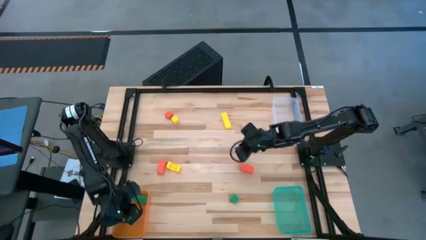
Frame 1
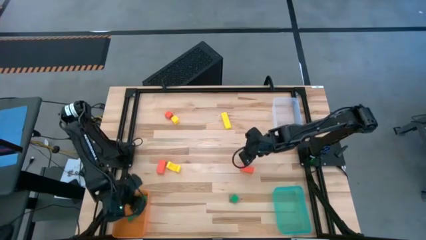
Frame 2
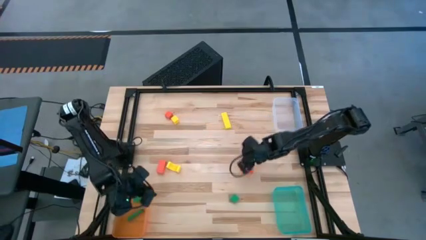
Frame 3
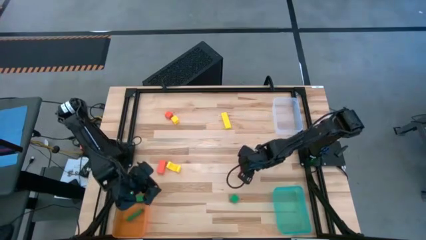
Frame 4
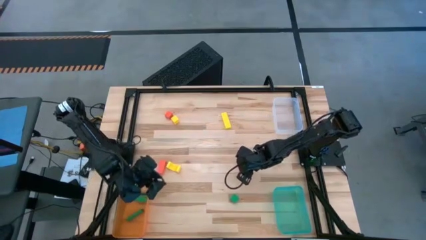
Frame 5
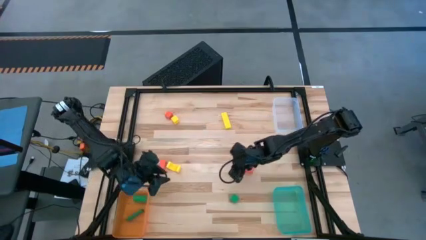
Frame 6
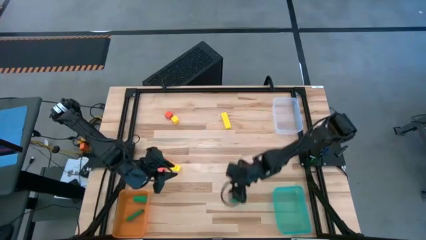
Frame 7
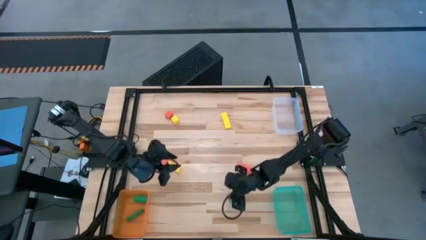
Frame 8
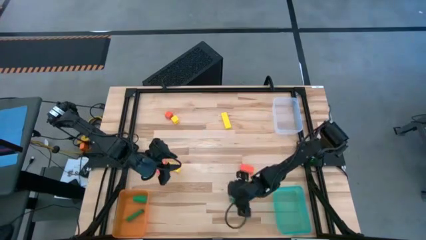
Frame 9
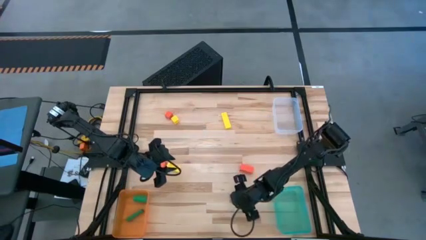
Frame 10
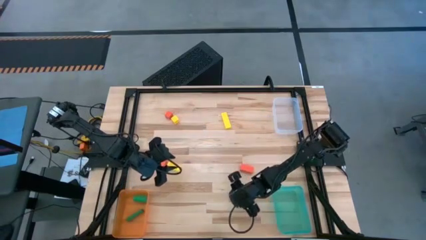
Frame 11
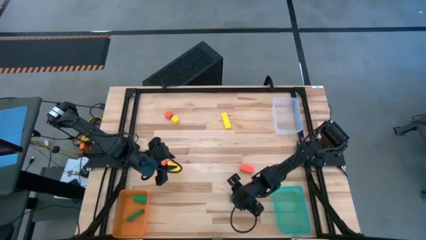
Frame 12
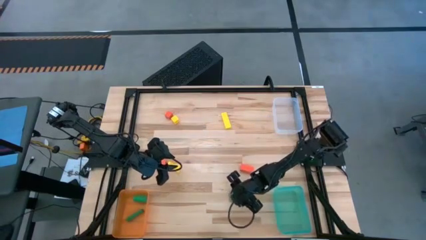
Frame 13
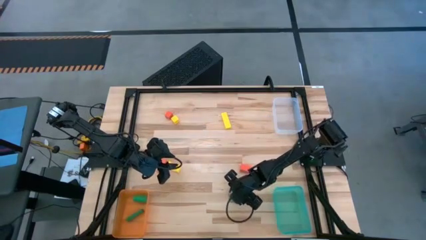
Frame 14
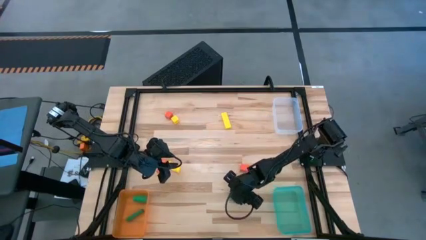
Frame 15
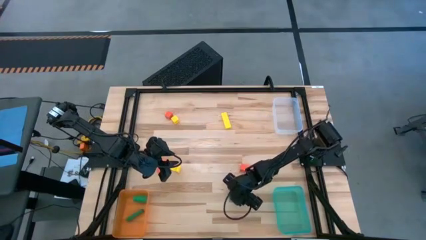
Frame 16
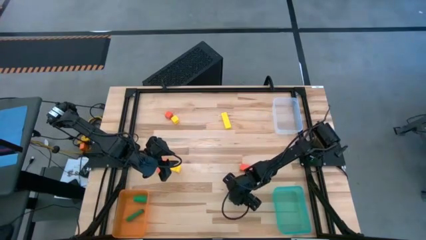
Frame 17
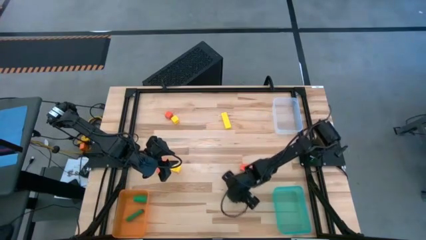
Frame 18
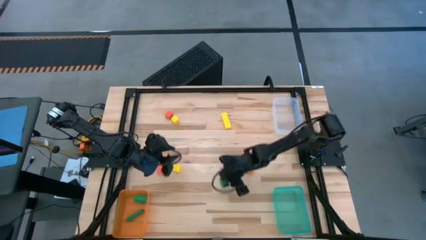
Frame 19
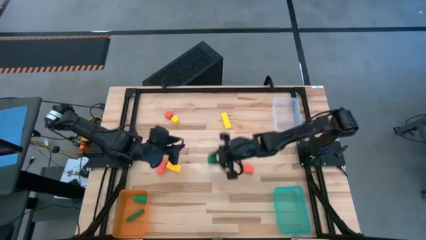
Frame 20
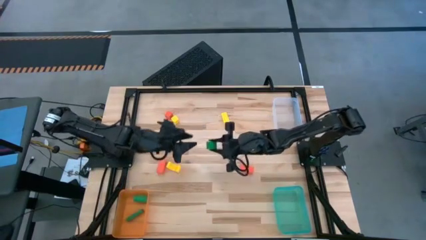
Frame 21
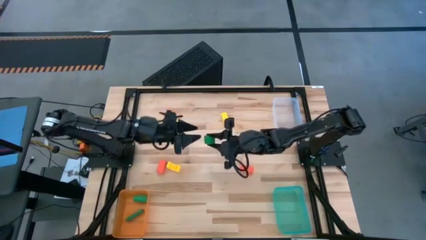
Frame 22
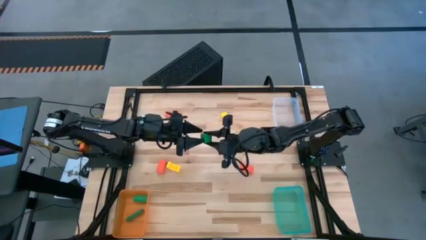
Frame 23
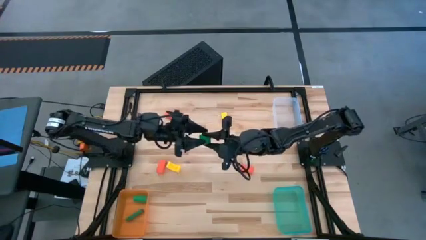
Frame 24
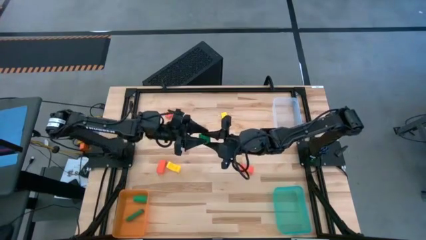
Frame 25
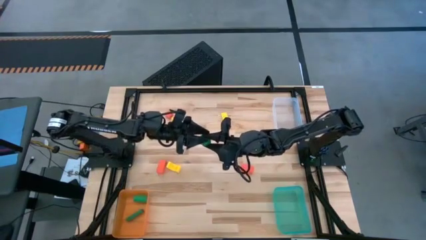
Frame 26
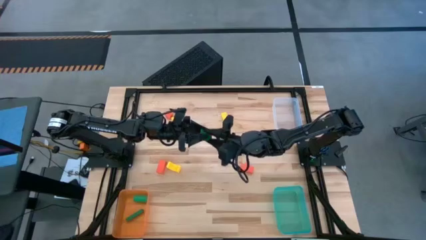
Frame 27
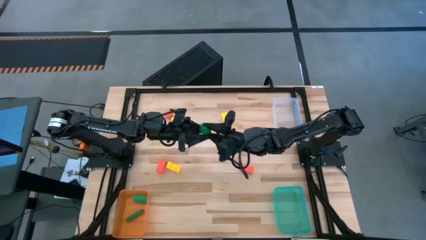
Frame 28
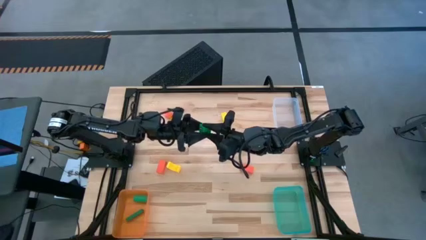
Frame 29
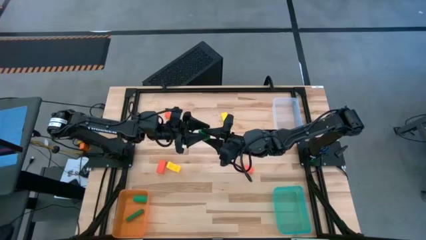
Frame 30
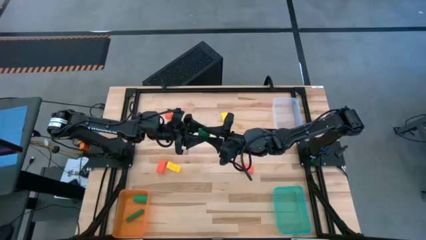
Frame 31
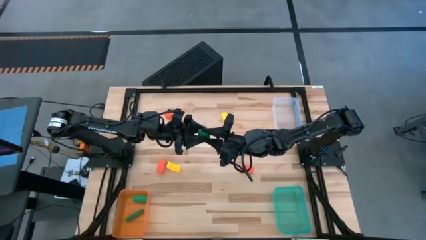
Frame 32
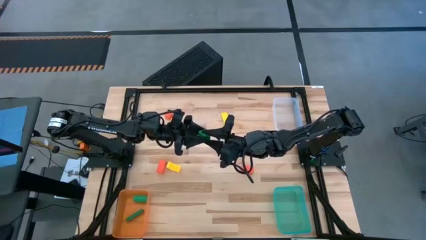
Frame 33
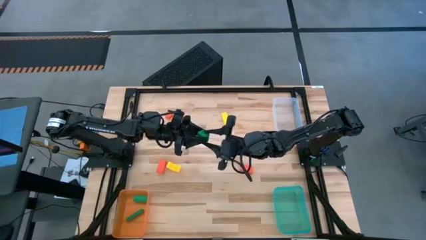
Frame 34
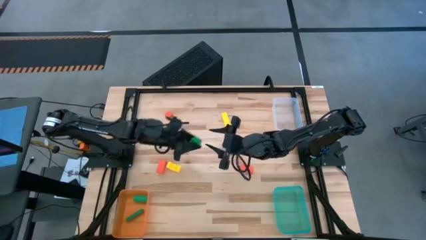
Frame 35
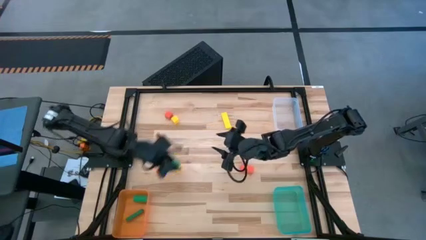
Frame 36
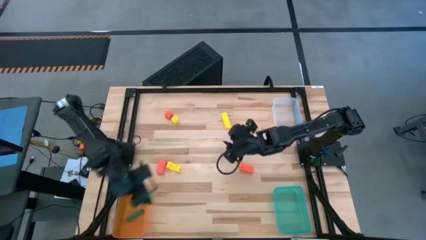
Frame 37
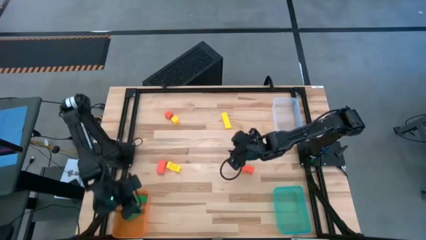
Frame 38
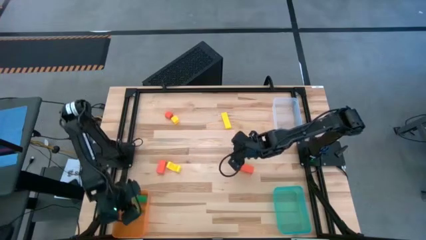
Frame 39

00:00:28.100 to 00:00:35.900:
Task: Sort & place blocks by color
Put the green block into the orange bin

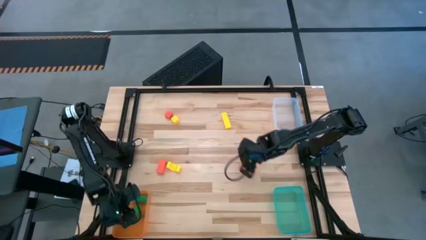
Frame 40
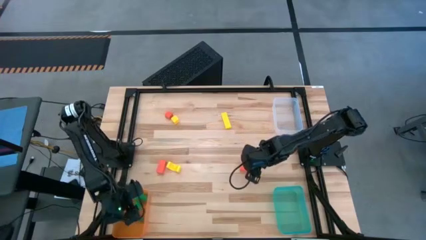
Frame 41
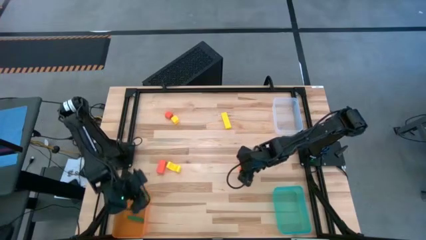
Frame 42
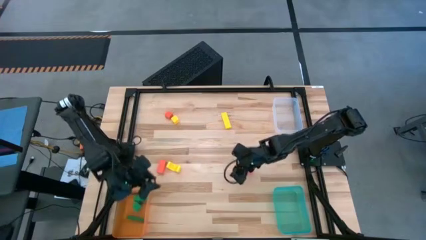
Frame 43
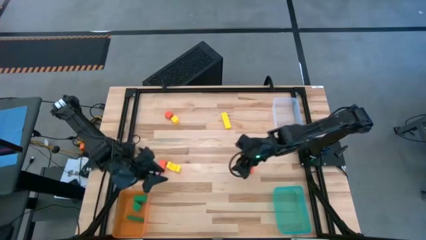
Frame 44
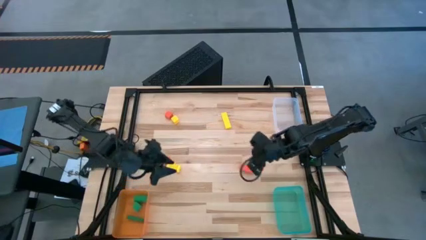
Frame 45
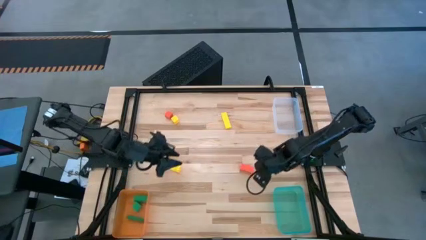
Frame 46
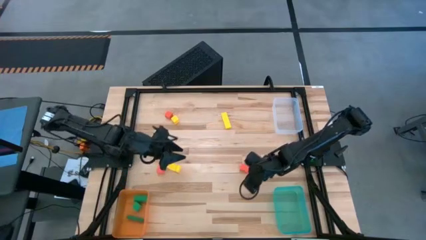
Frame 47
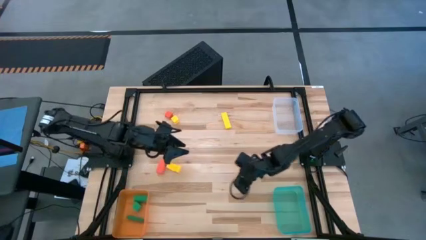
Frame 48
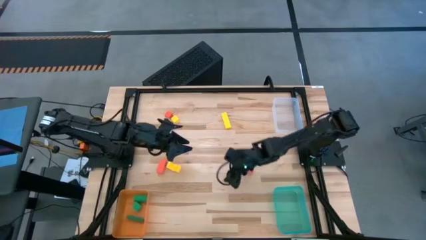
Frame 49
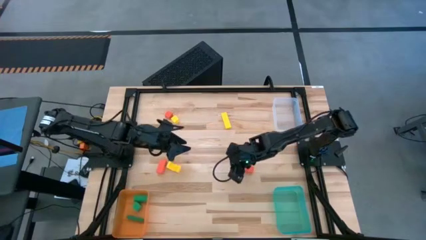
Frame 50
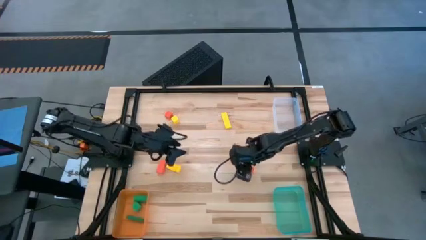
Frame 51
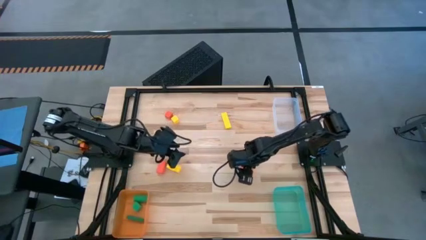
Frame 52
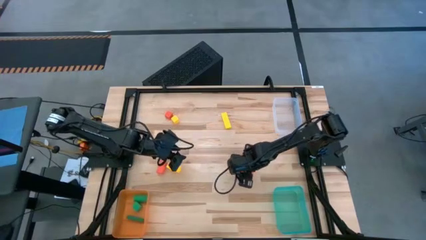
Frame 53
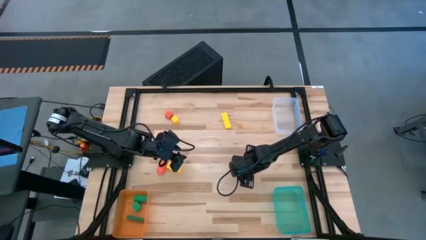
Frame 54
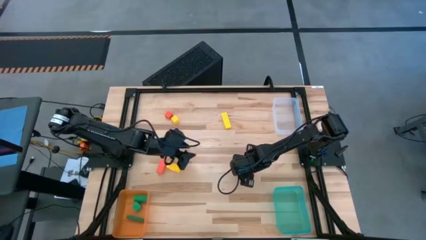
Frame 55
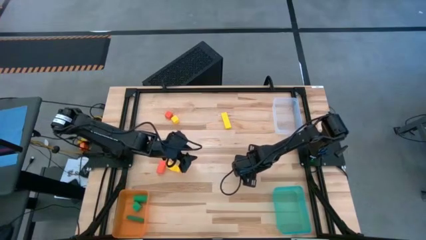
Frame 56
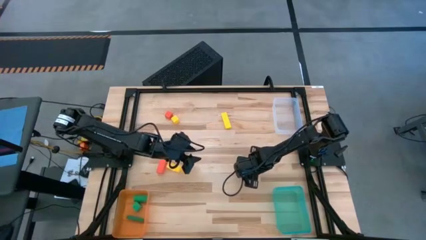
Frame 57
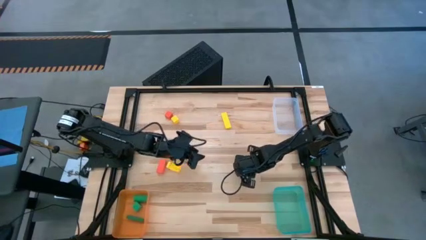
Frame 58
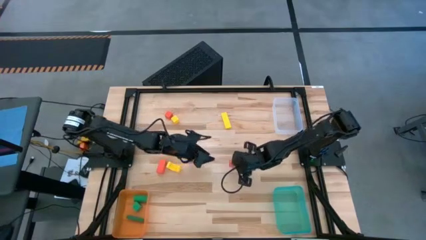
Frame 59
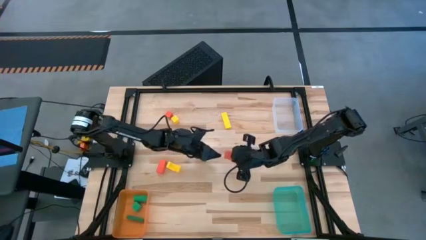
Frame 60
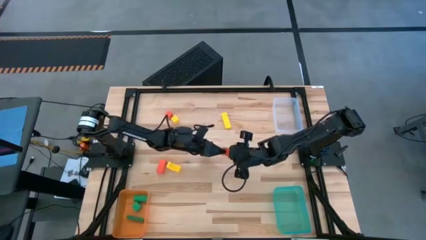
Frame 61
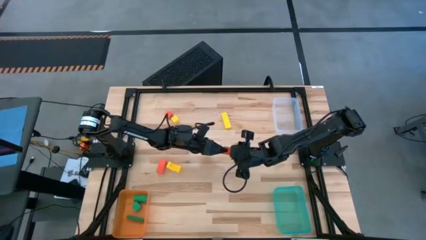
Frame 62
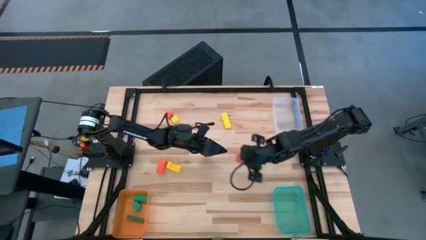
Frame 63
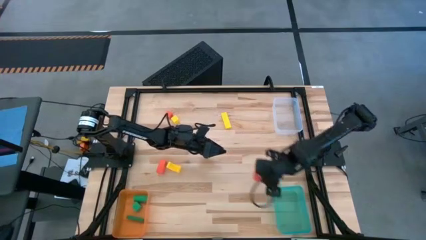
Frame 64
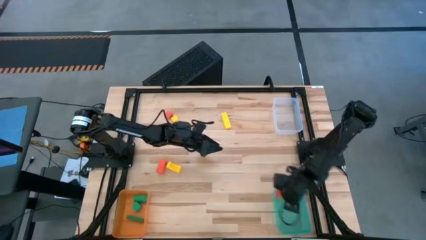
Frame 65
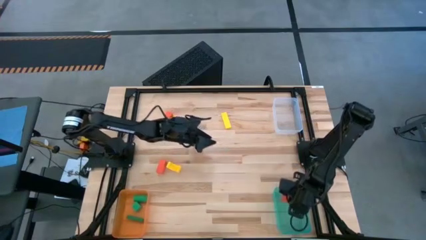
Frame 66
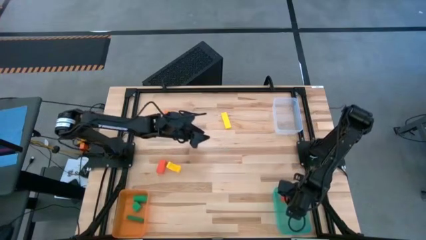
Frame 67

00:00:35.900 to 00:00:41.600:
Put the bottom right orange block into the blue bin

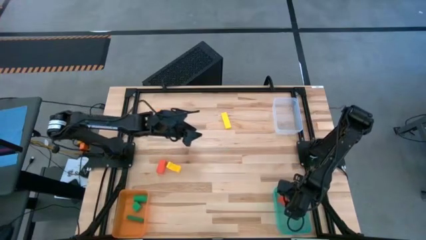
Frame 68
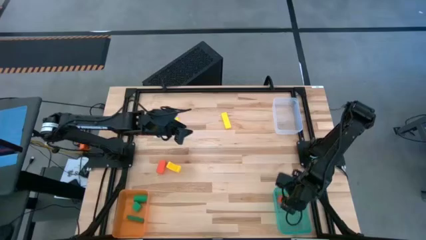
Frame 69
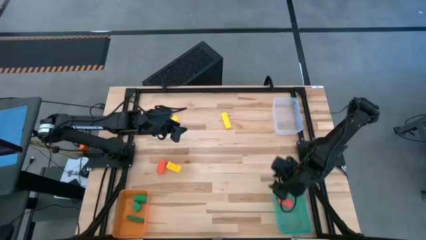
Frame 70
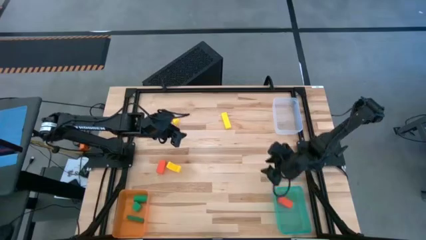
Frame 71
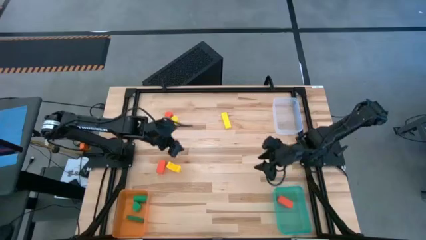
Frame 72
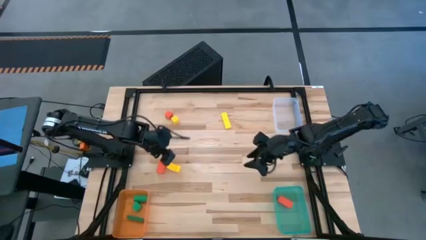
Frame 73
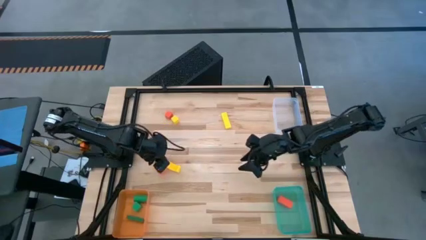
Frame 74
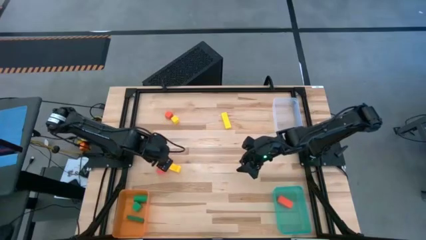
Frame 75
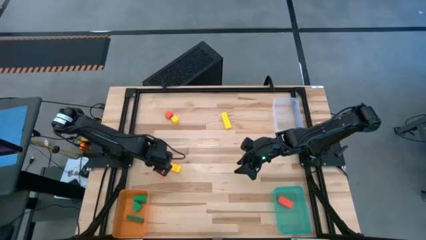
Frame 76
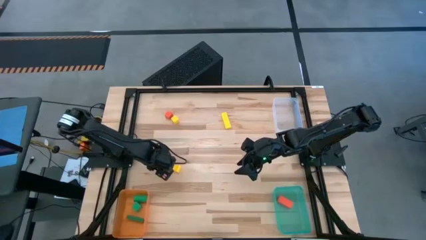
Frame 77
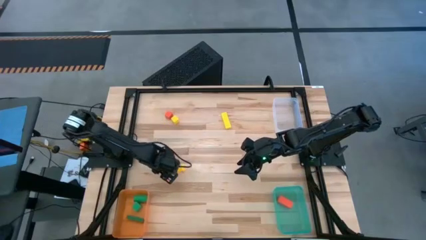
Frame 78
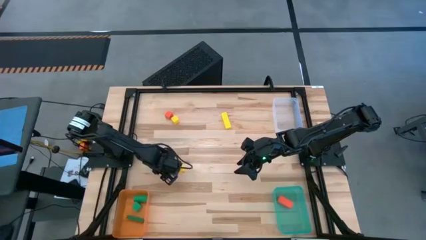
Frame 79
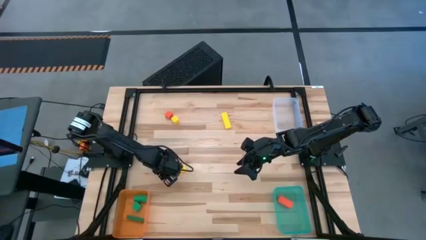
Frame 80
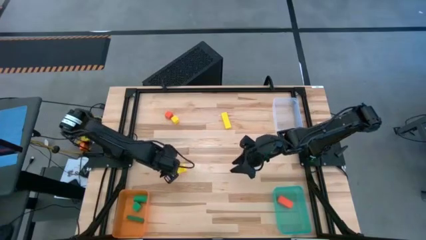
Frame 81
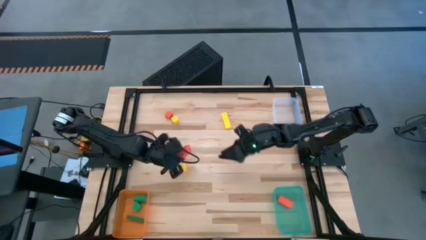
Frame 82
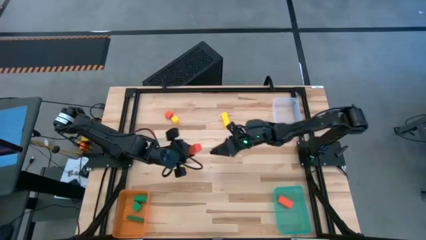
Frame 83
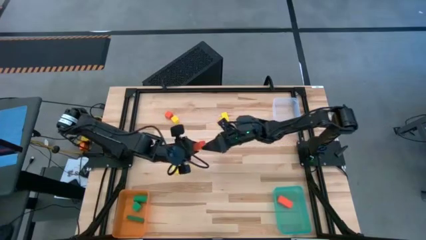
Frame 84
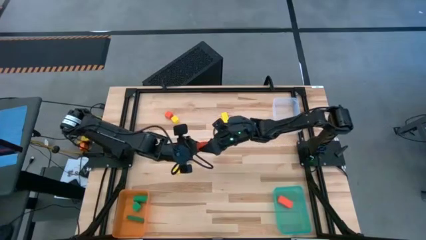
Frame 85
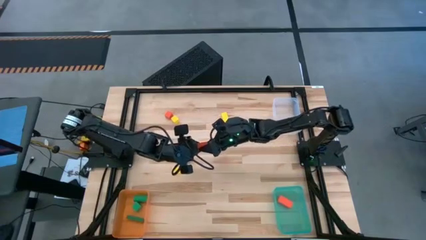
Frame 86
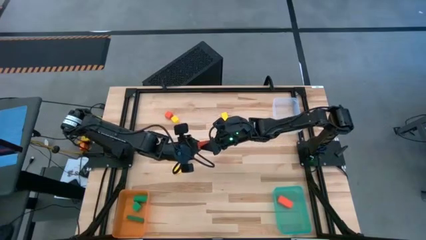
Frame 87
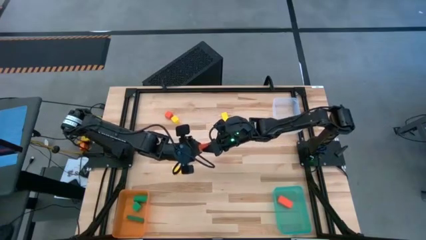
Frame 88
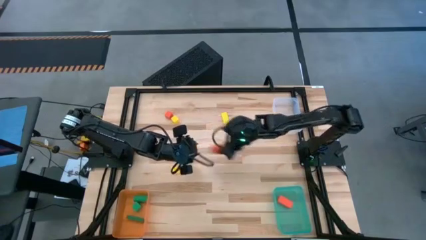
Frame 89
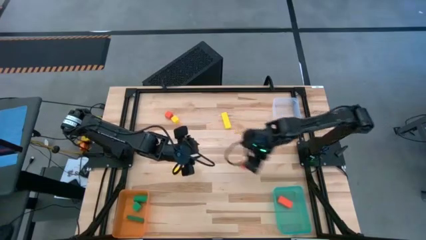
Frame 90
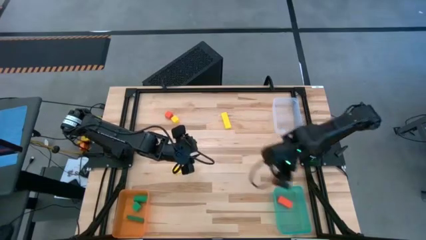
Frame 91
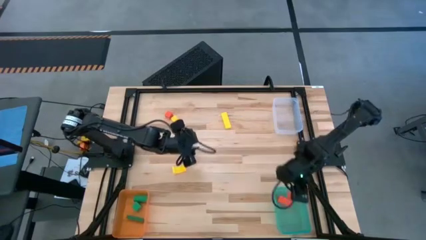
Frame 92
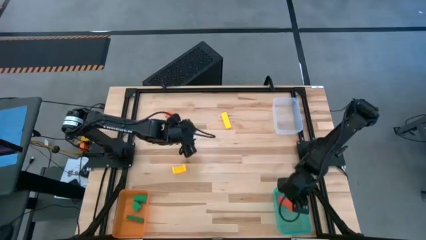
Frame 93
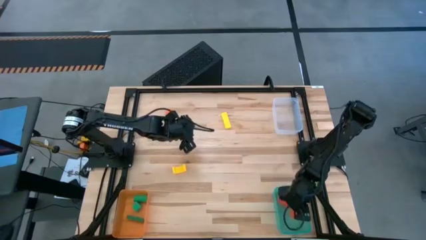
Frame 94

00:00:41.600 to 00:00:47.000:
Put the bottom orange block into the blue bin
